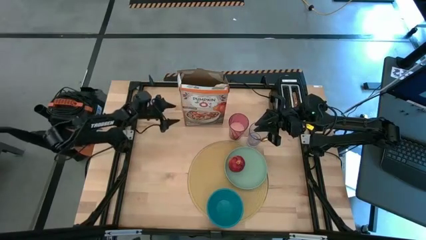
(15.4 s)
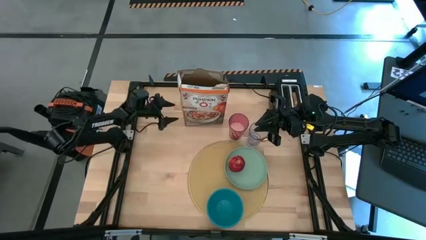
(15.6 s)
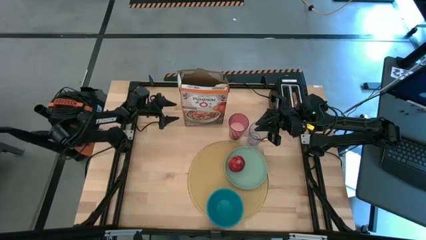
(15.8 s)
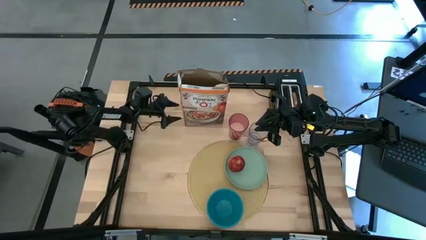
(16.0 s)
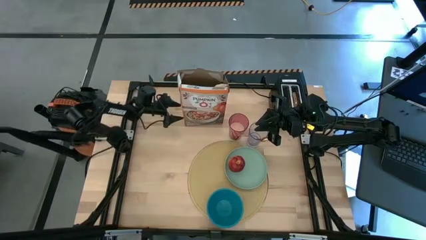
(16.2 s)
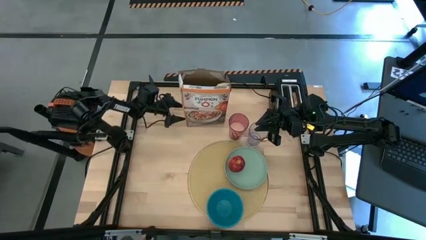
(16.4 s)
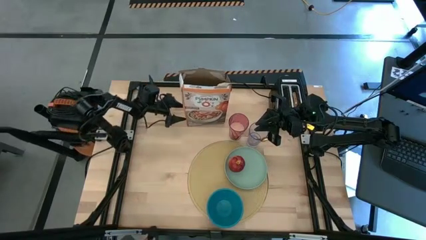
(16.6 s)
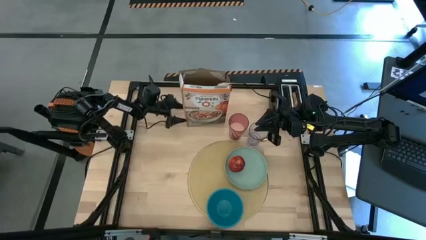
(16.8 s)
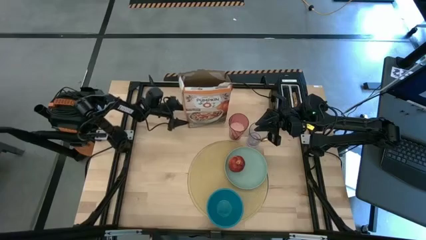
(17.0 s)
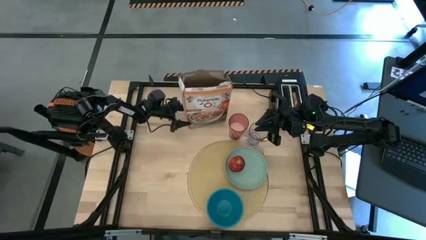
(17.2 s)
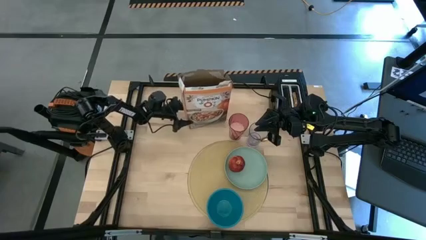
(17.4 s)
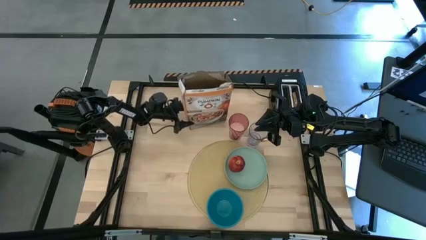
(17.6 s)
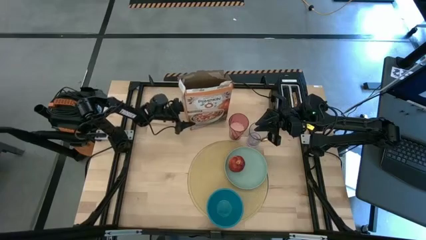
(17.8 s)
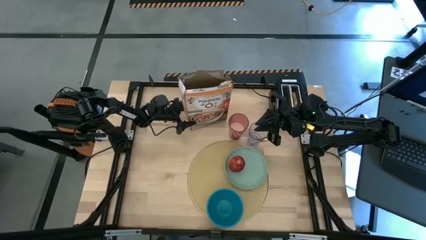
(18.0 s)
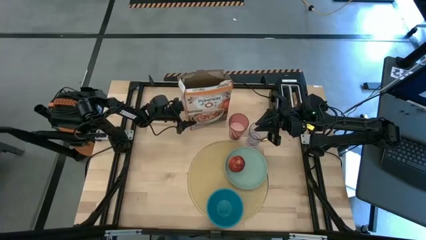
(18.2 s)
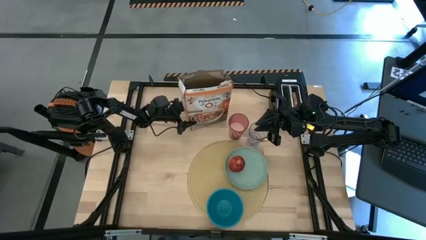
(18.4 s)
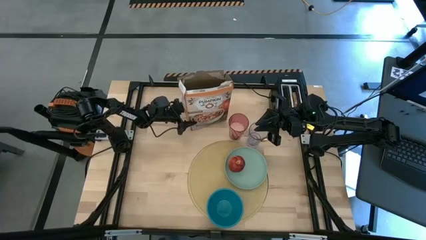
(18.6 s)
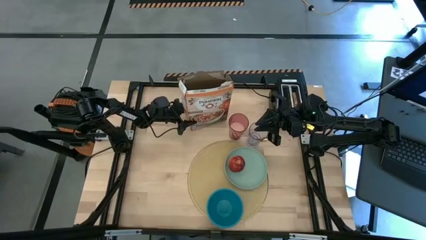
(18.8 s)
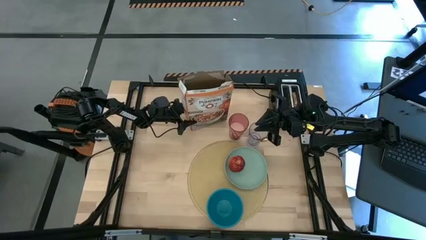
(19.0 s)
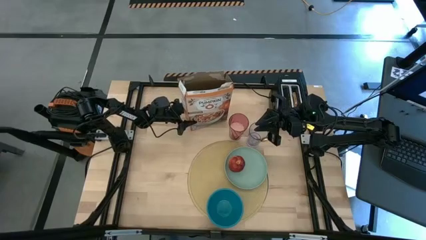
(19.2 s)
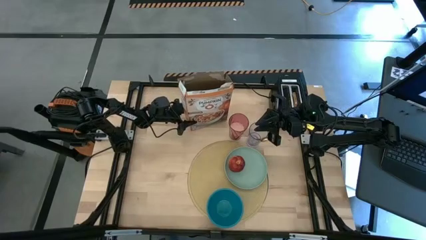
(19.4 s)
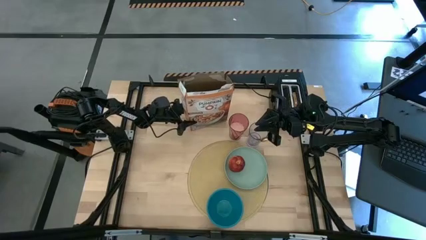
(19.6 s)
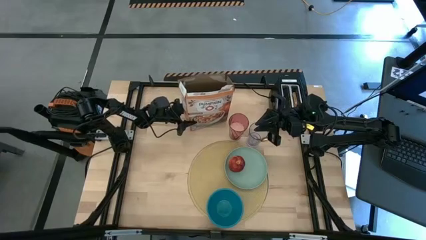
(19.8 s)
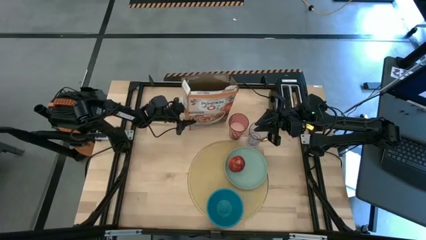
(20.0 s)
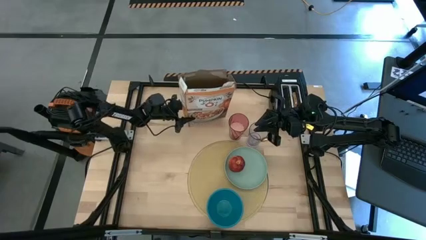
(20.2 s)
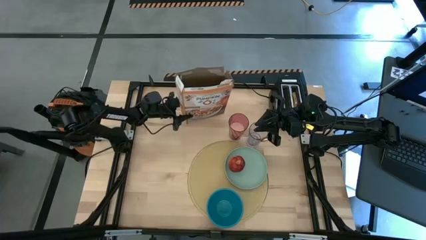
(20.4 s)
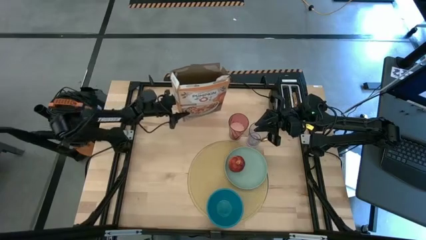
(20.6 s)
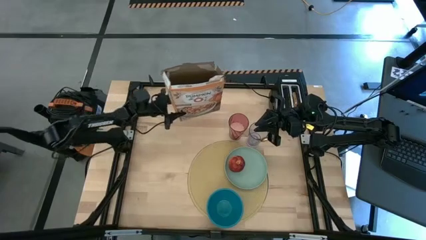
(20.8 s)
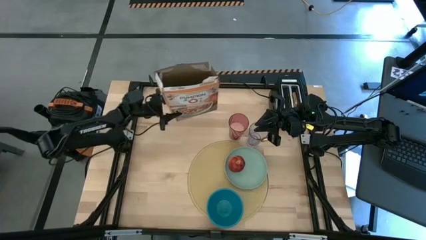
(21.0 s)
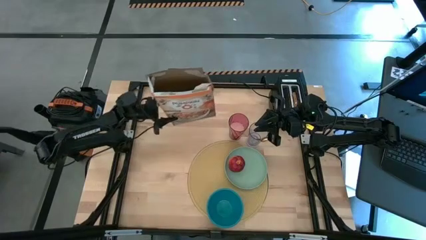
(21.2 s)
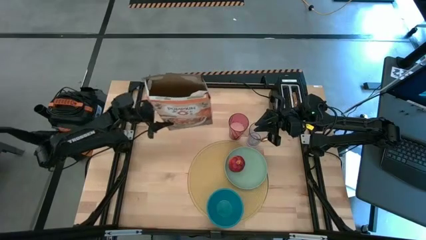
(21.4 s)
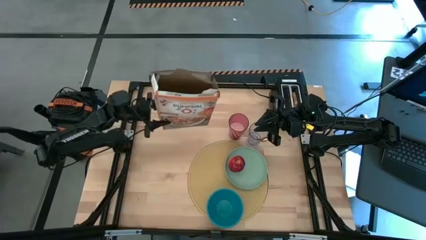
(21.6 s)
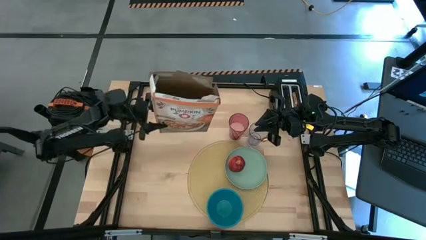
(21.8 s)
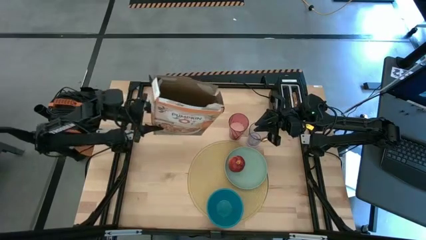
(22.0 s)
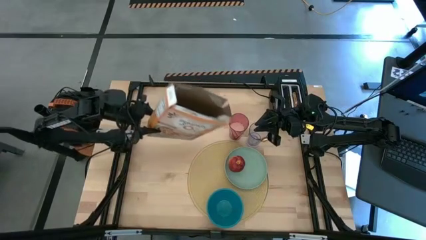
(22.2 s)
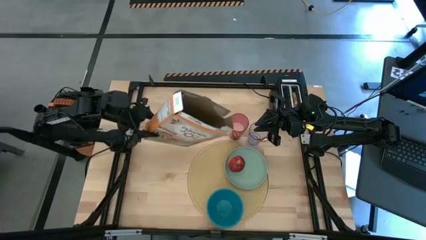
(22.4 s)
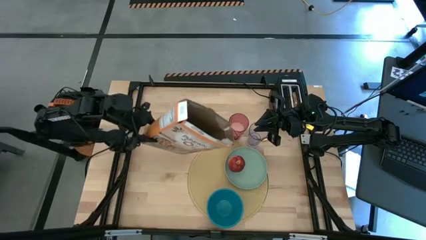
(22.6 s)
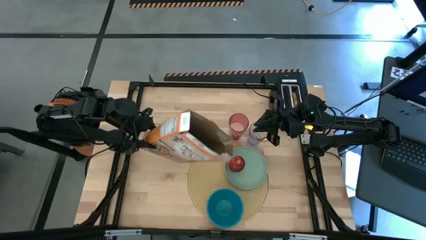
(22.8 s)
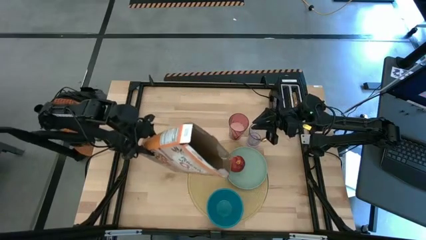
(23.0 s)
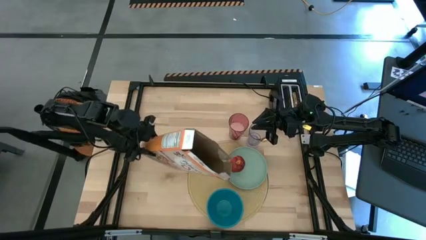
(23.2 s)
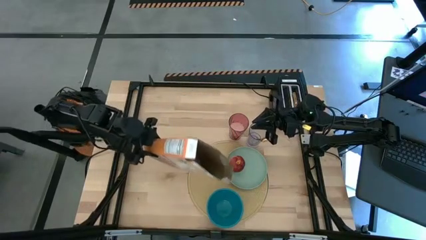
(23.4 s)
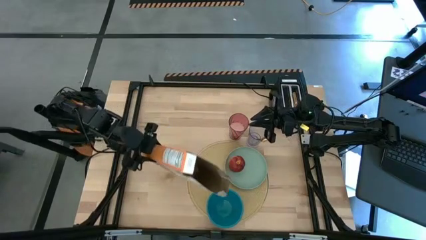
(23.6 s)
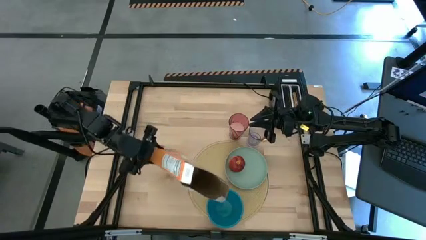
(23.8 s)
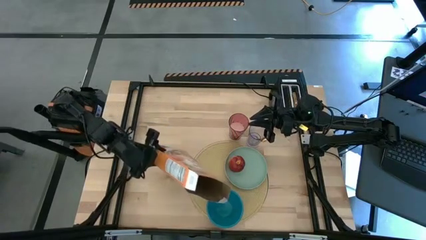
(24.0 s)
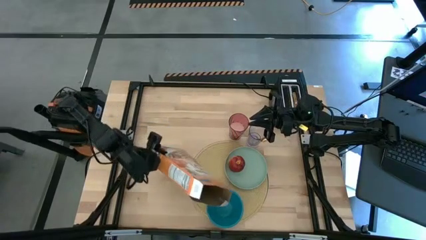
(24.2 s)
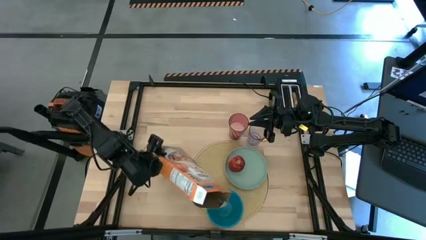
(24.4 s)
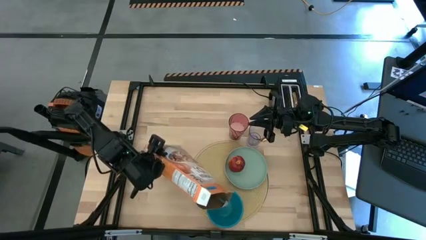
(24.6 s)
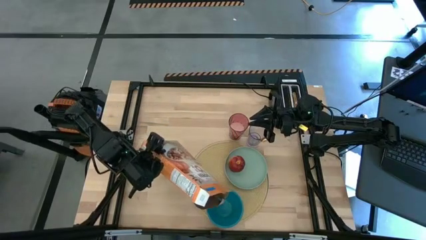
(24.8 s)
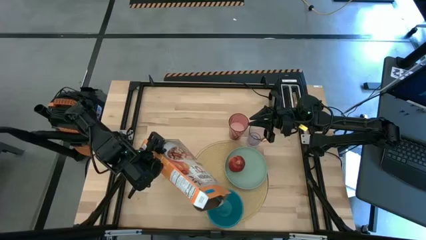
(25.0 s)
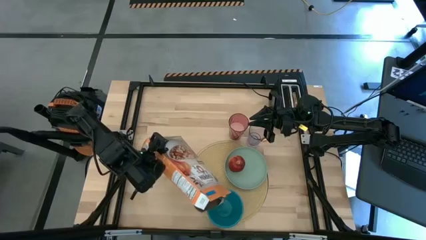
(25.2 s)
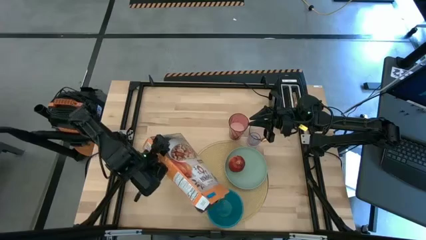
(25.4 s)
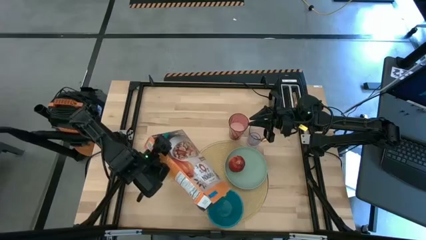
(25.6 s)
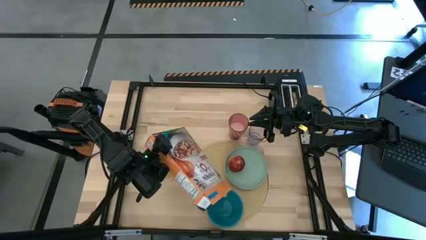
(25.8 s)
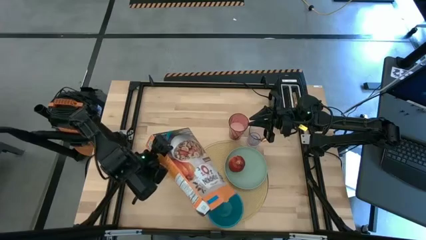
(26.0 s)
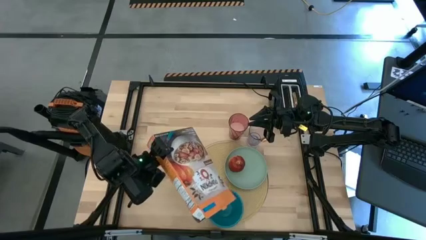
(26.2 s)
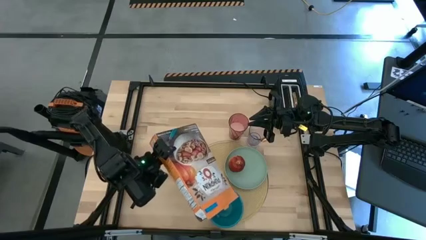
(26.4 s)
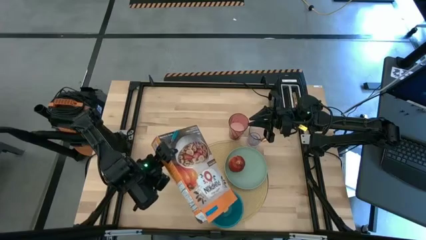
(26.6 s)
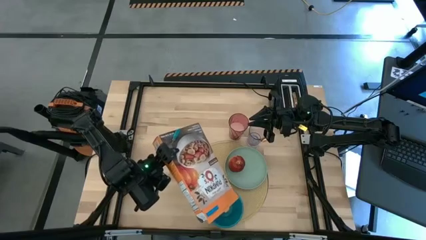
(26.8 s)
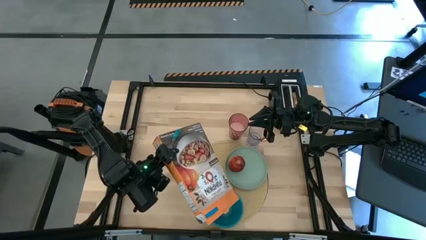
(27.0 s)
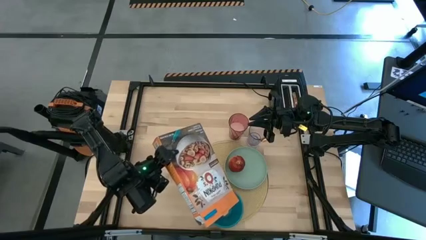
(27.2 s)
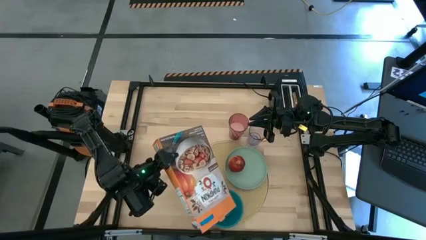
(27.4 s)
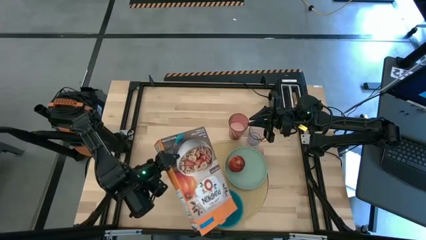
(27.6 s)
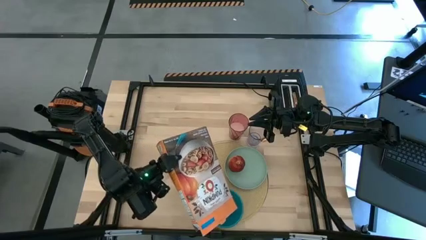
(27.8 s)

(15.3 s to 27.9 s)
Task: Arrange a breakfast setting
Pour the cereal into the blue bowl

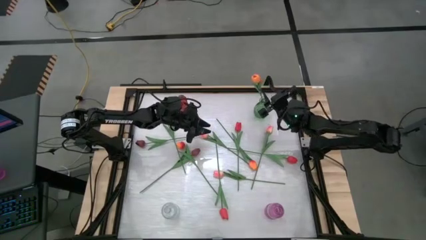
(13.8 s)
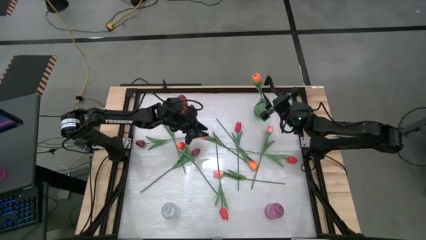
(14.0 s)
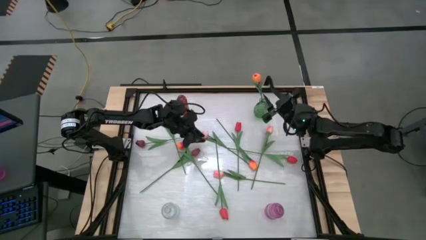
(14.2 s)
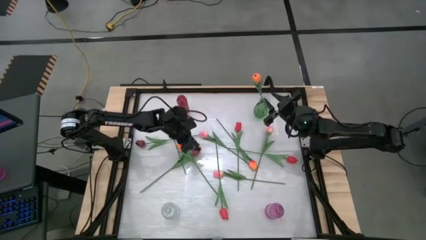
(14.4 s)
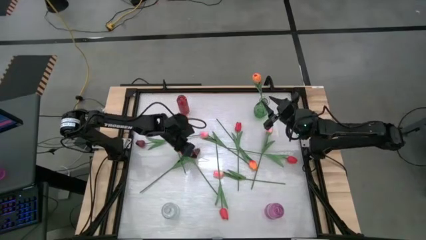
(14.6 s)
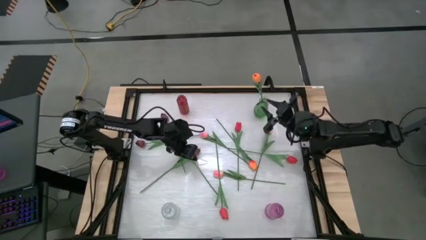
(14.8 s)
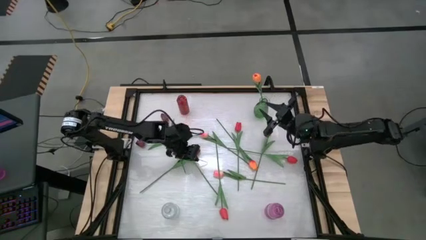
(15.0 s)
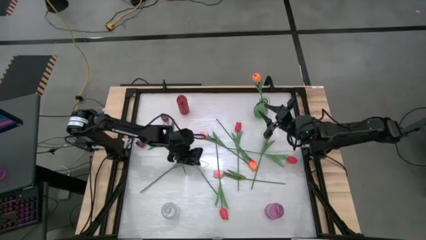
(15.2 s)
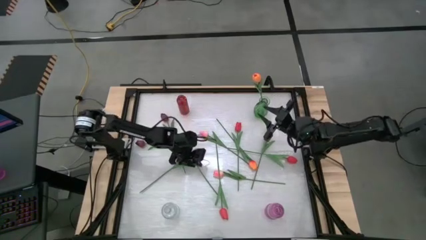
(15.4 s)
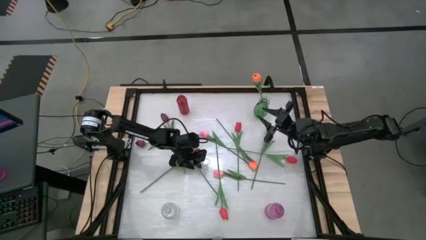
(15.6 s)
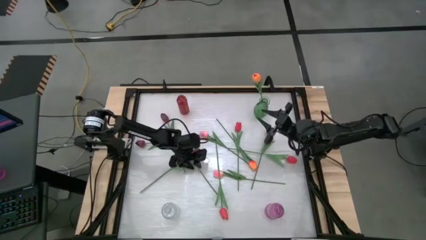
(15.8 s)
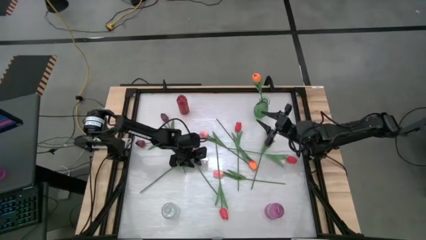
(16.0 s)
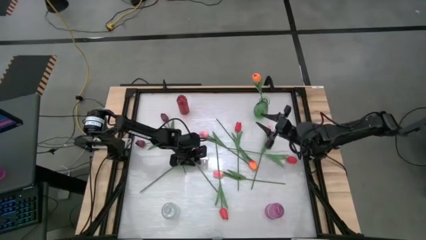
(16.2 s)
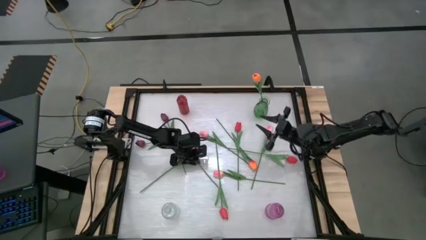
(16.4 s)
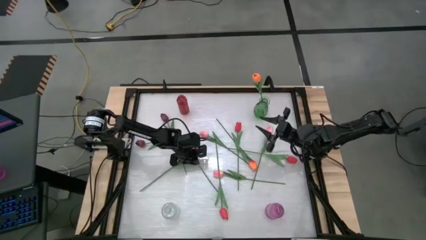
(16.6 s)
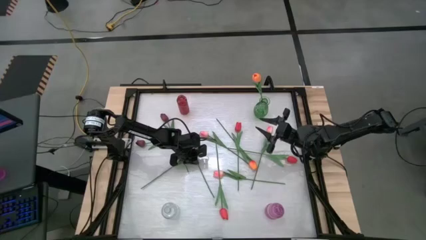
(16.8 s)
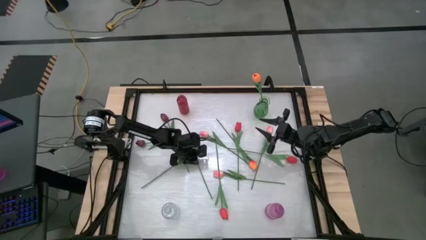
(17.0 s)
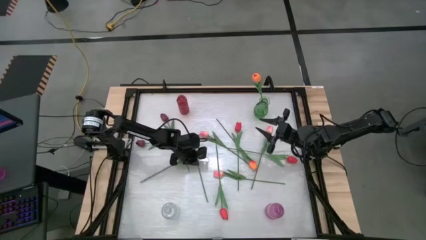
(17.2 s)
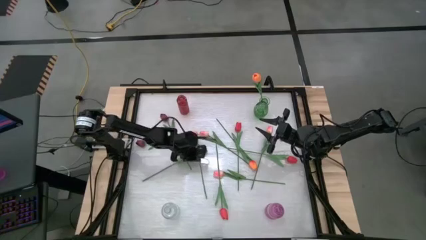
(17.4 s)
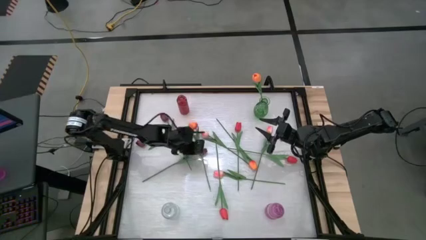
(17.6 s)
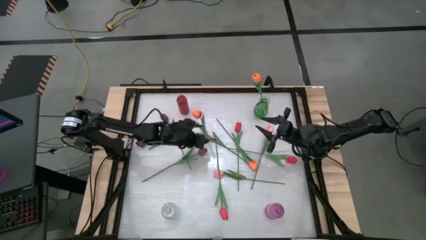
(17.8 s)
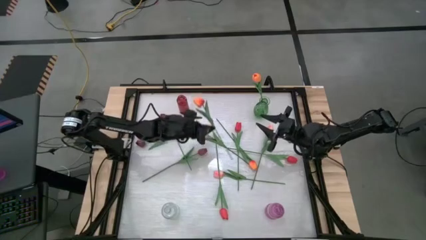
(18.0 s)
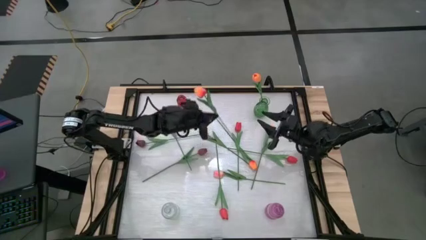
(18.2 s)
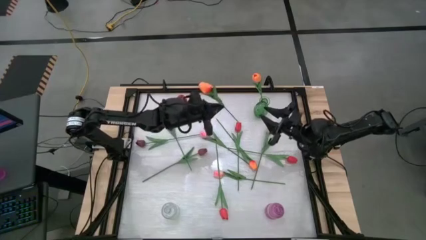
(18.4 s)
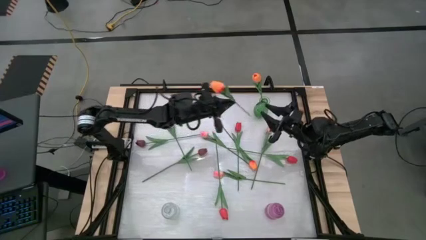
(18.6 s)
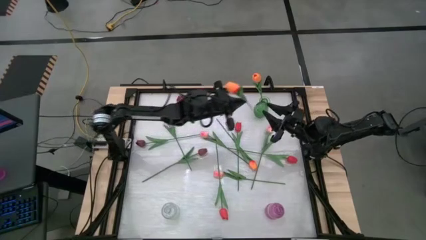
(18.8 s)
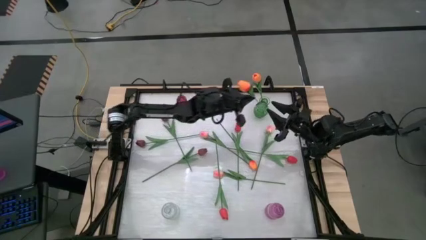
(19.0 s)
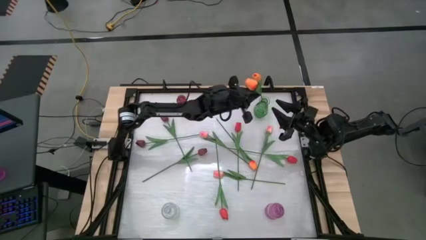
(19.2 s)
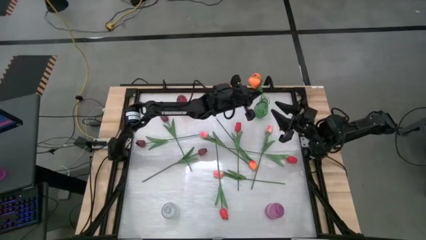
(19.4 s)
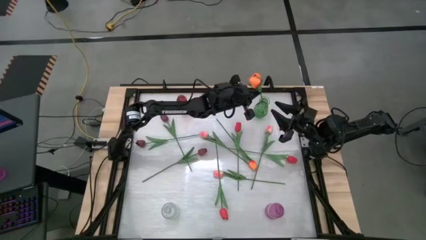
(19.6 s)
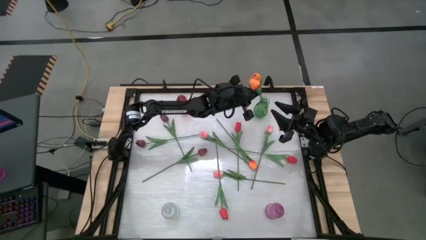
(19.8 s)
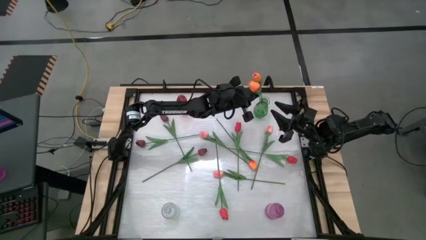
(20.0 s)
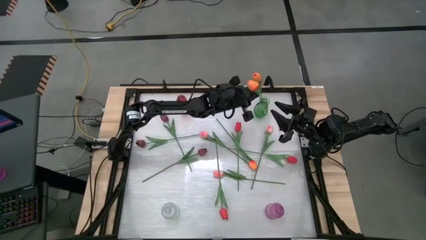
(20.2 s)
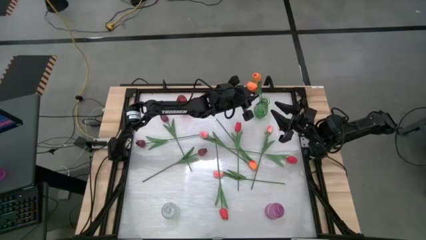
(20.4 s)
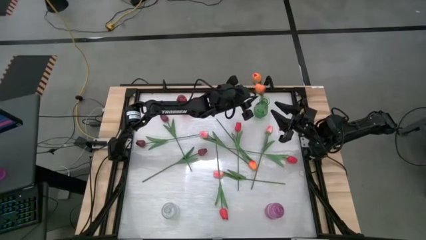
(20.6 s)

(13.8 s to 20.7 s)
Task: Sort flowers into vase by color
Put the orange flower into the green vase
